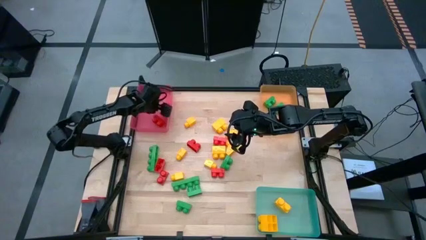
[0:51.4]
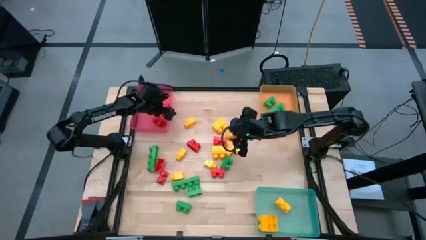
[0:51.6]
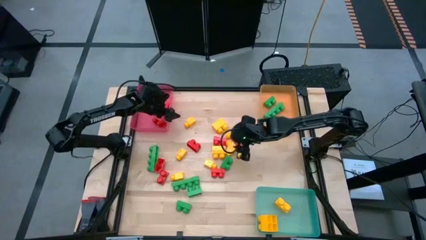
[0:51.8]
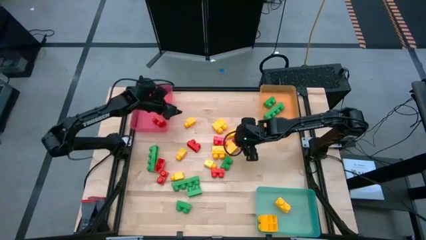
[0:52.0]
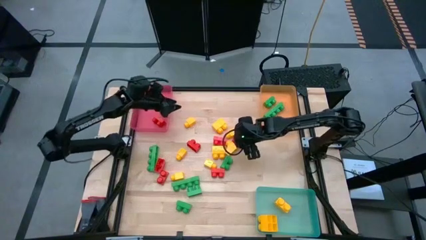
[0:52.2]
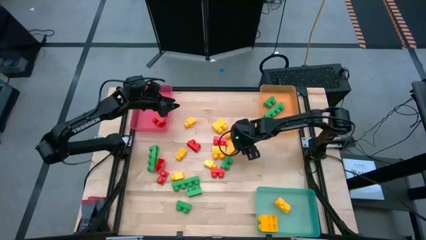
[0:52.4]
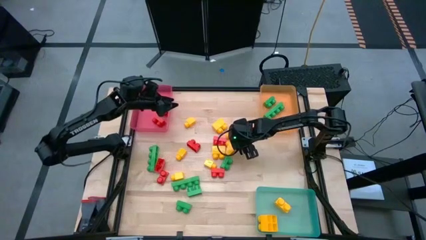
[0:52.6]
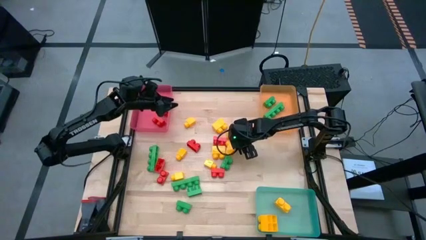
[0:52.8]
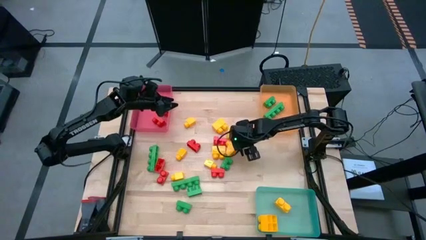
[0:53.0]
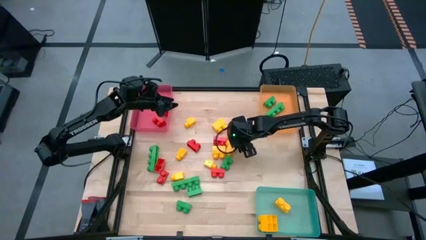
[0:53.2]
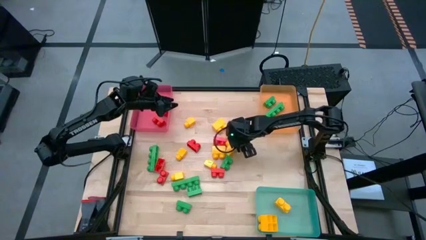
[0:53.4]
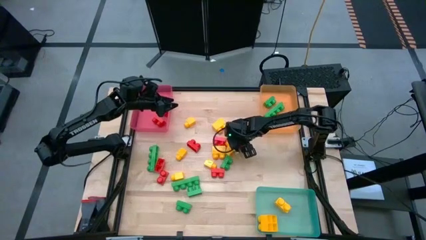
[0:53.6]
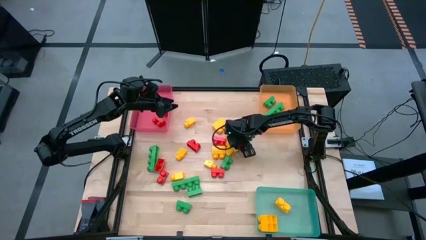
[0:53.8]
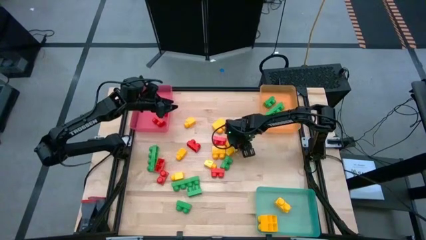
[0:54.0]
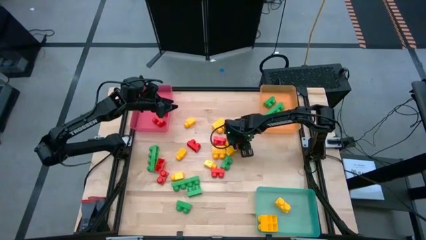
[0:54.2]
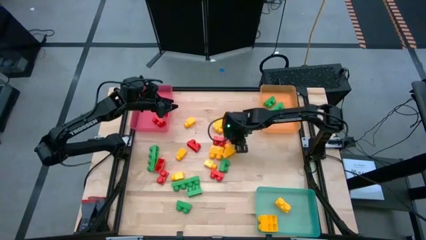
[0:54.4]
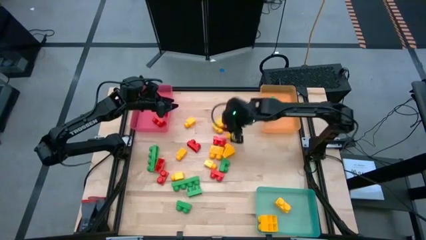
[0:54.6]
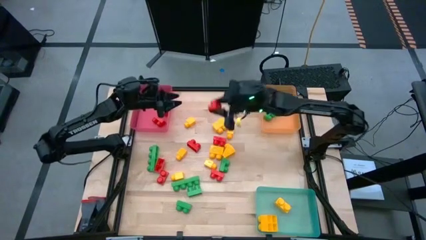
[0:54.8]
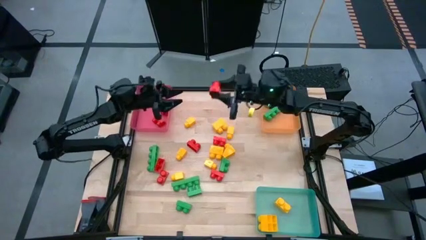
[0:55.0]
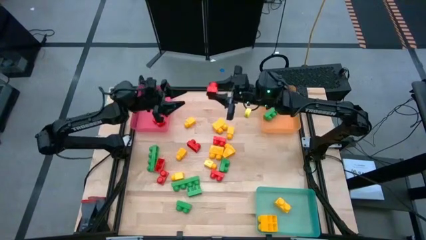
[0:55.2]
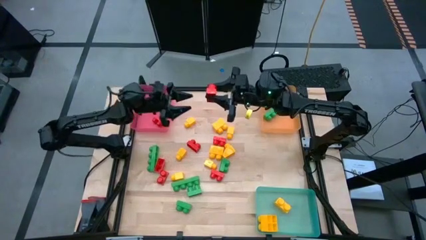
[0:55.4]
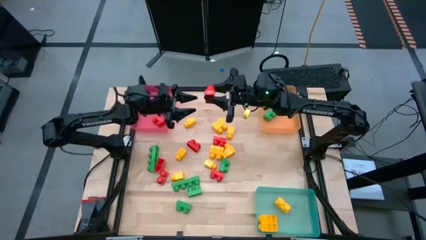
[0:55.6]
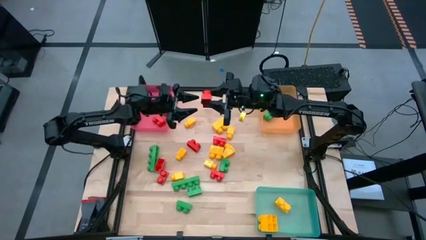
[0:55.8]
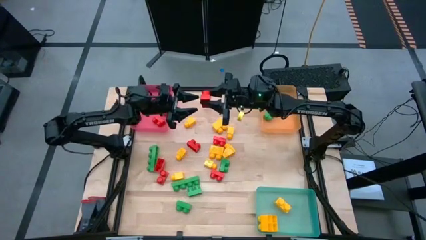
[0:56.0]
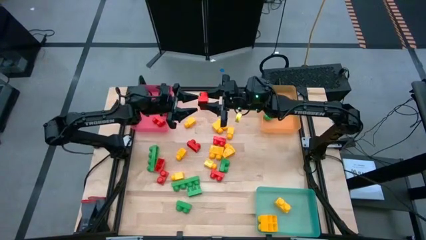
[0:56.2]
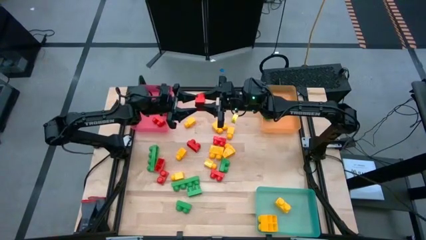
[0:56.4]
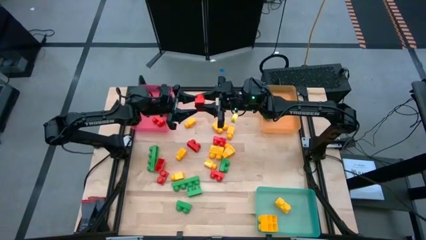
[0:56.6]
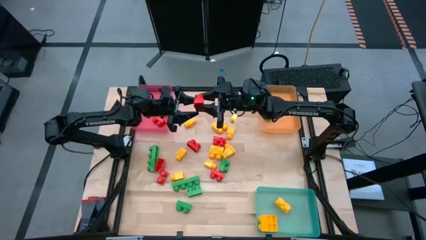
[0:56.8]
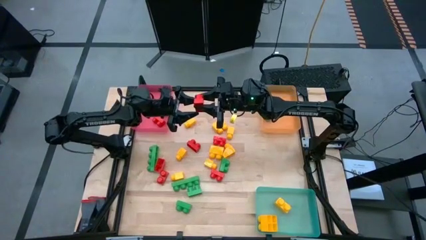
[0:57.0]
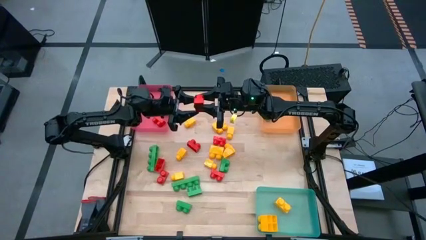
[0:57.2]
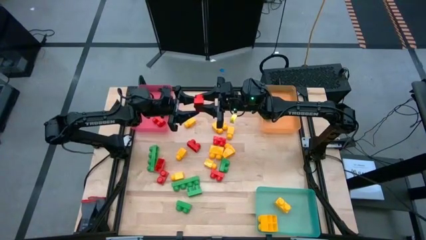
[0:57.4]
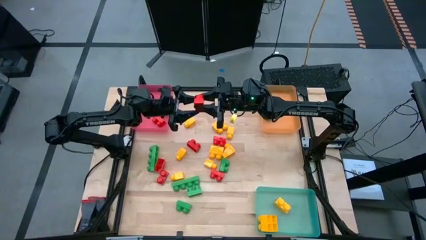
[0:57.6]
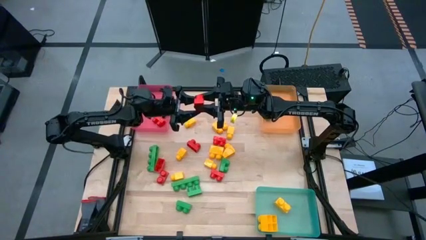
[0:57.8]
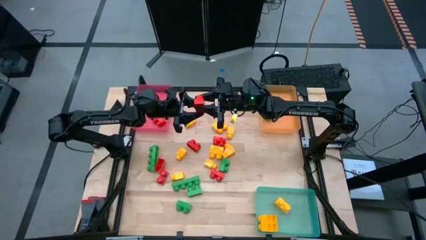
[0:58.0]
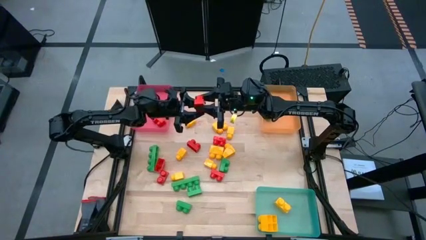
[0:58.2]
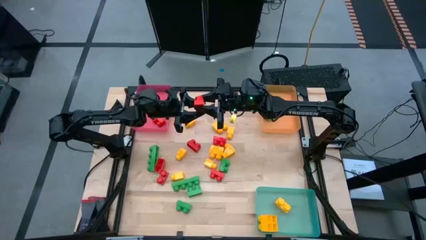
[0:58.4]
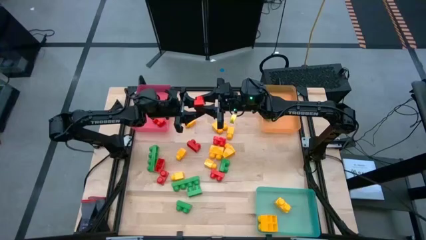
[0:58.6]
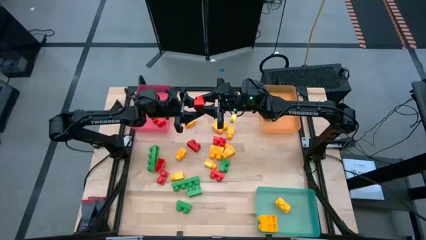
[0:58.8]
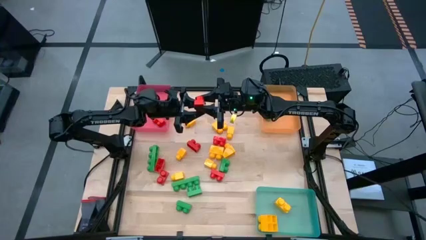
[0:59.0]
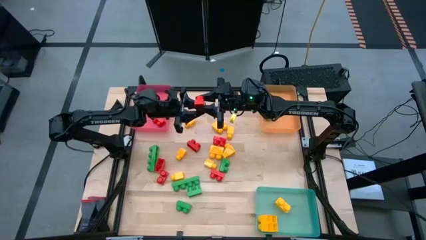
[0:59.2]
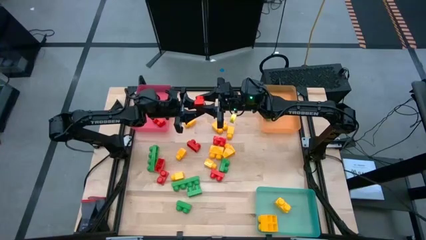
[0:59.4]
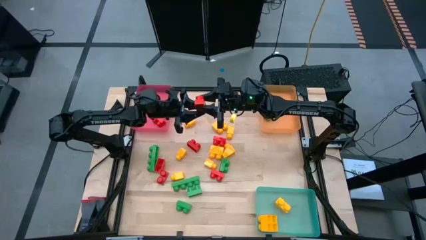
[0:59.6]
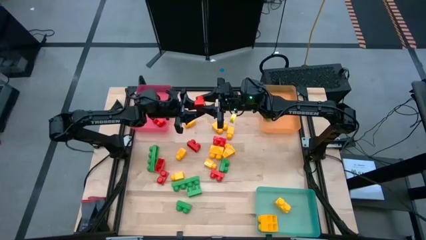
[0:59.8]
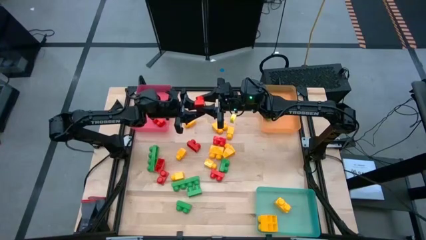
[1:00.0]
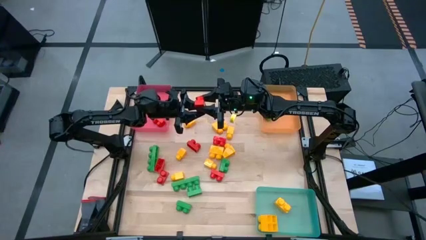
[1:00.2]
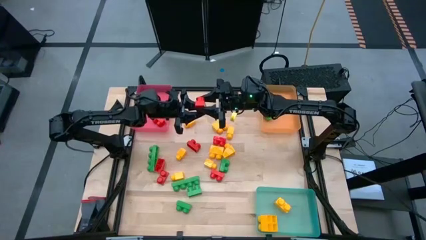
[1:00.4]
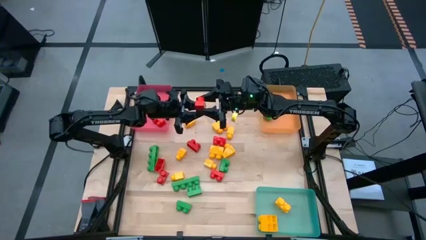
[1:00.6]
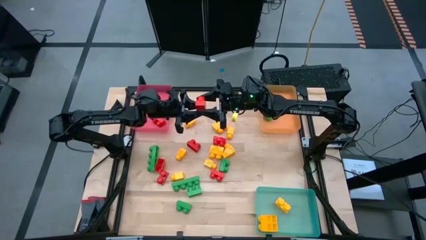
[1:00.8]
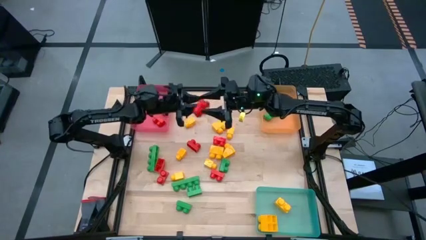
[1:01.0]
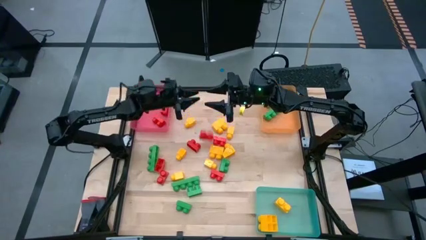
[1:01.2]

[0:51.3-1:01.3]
Task: Sort blocks
Put the red game piece into the red bin

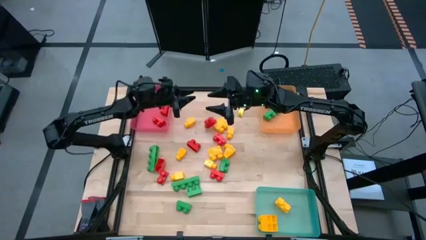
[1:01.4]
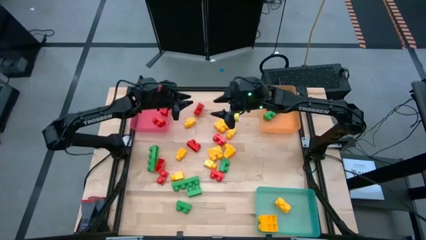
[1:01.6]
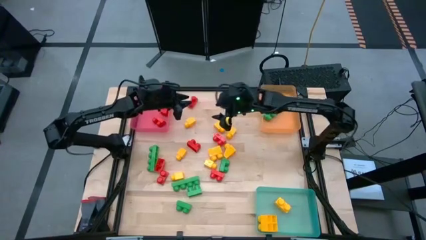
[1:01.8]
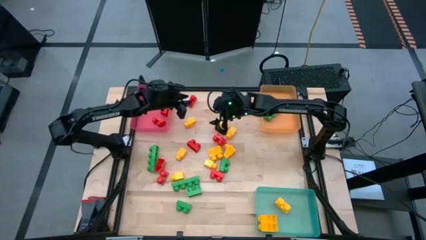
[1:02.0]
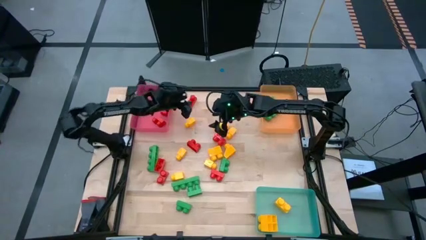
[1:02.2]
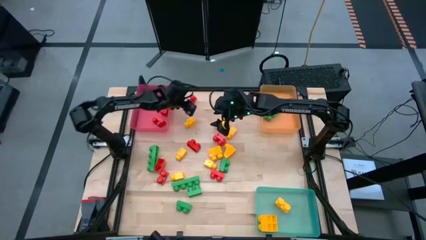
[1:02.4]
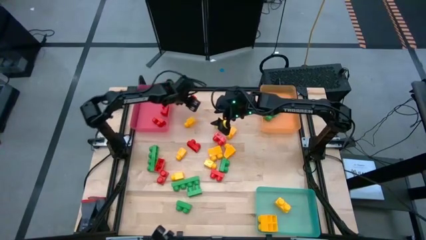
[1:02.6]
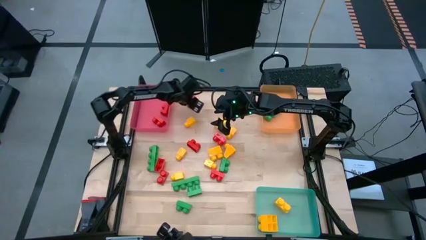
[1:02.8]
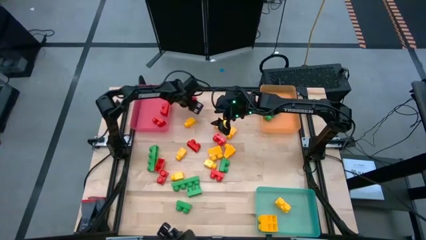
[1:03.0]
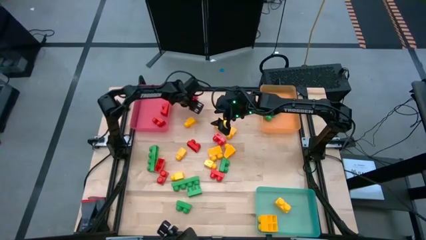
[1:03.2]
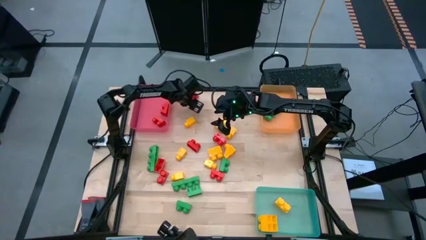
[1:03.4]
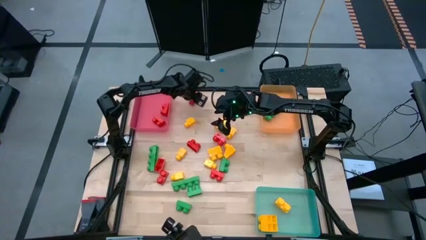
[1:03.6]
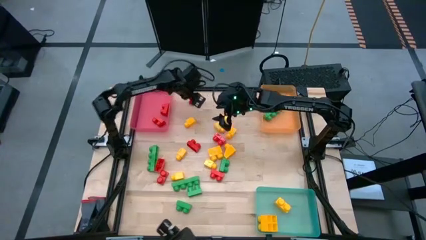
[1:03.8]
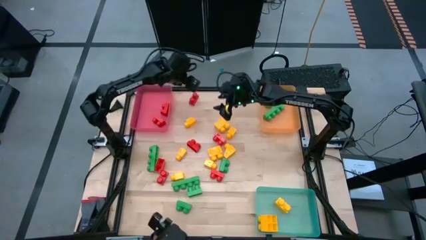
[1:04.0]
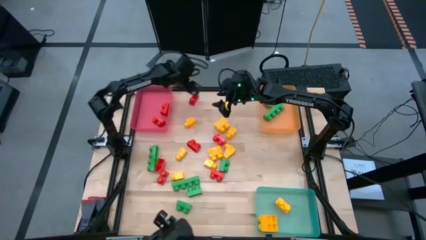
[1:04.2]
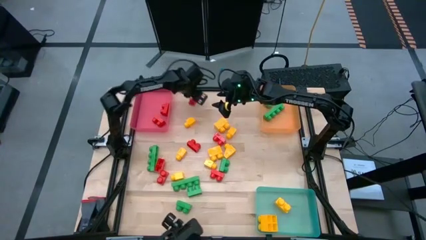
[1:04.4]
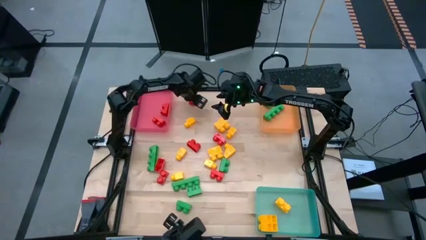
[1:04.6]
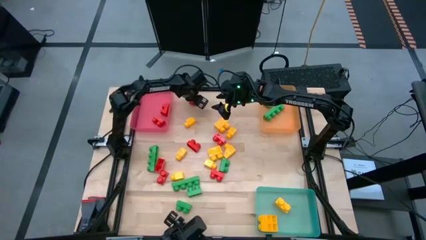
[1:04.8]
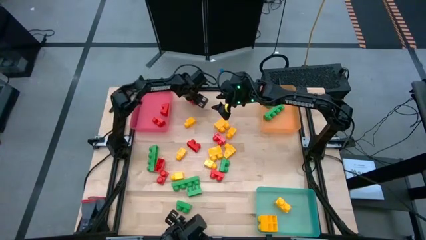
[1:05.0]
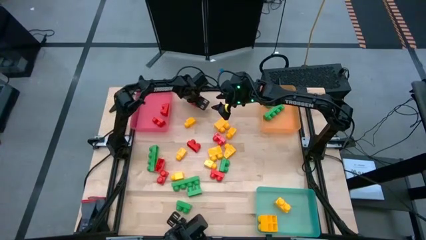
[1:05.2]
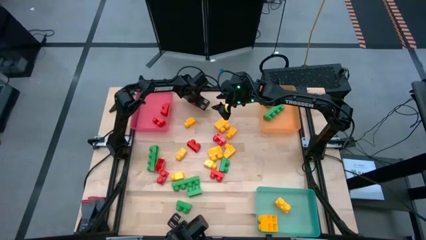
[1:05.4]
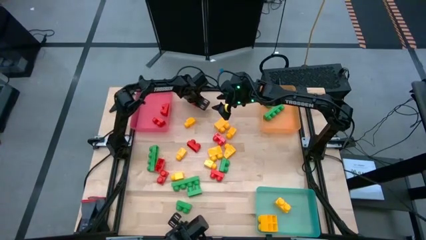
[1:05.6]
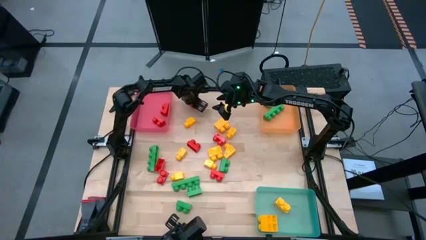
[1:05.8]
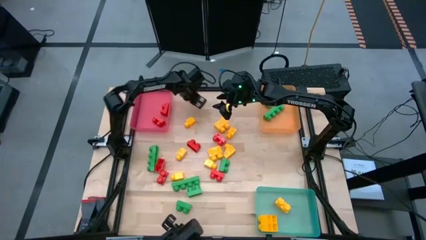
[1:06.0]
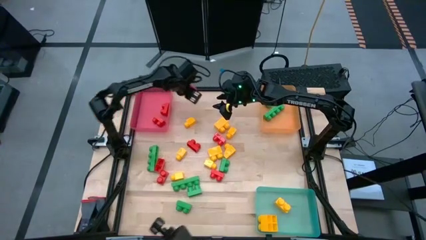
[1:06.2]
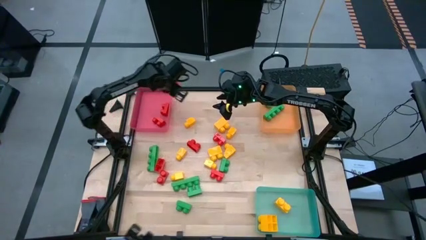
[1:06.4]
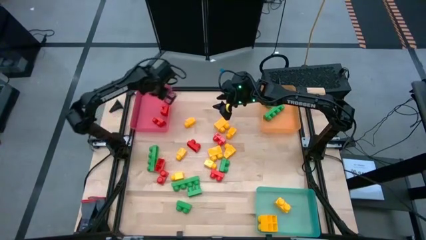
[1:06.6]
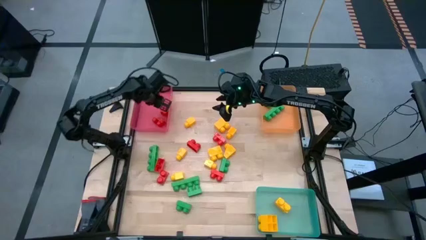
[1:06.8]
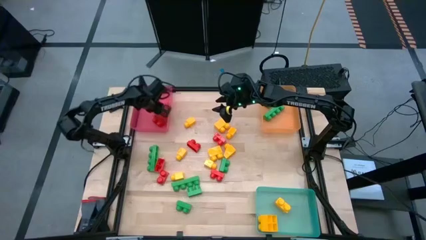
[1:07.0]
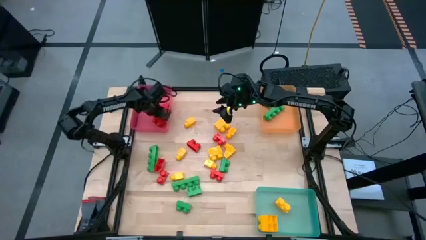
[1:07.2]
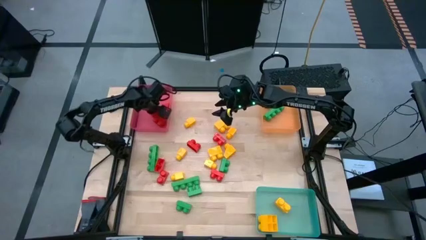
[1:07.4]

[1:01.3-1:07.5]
Put the red game piece into the red bin
